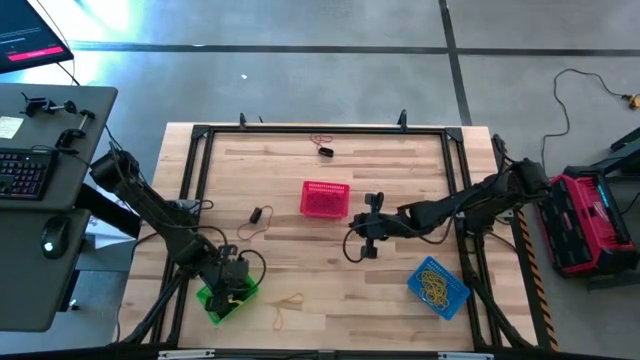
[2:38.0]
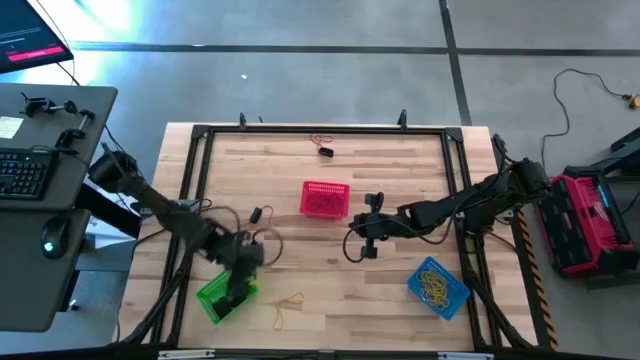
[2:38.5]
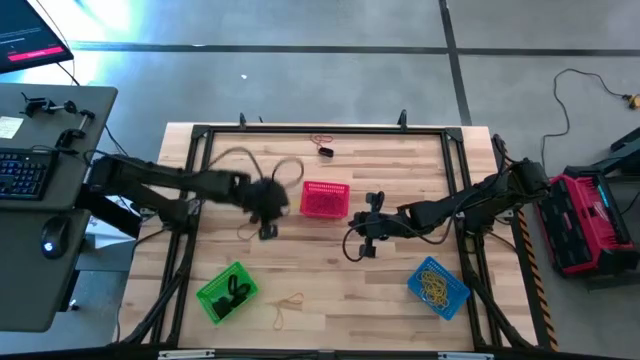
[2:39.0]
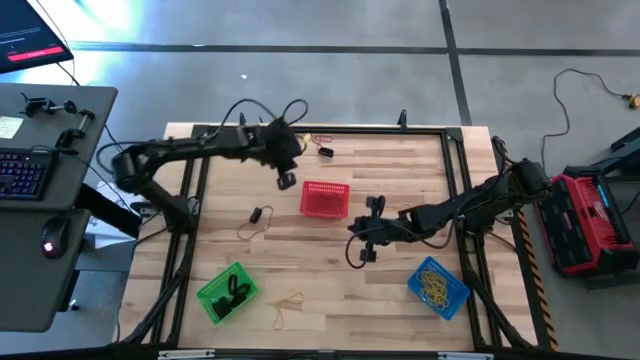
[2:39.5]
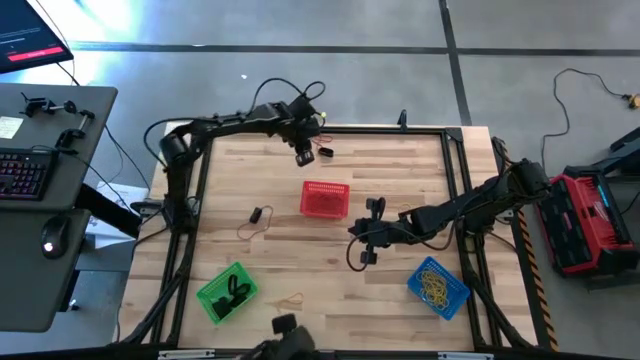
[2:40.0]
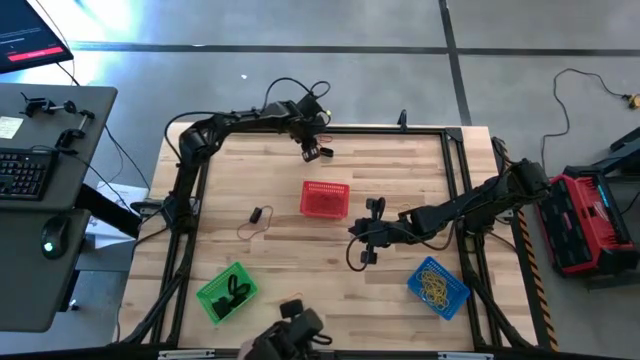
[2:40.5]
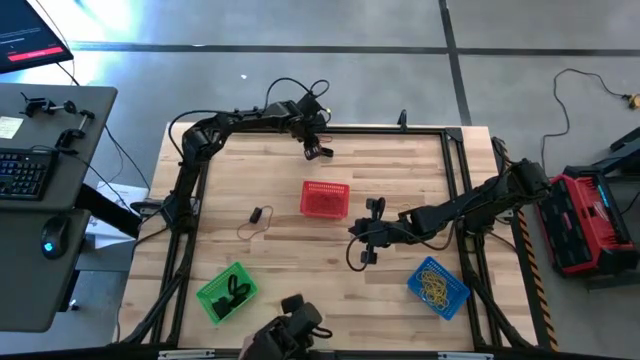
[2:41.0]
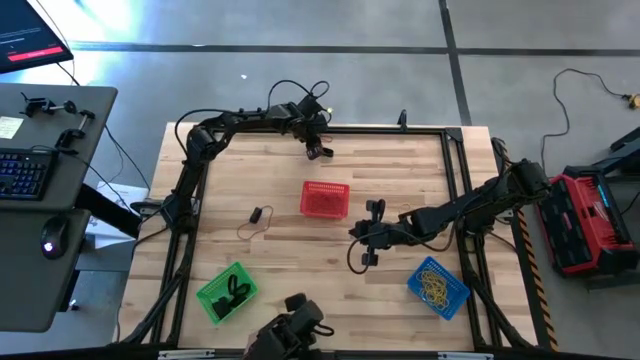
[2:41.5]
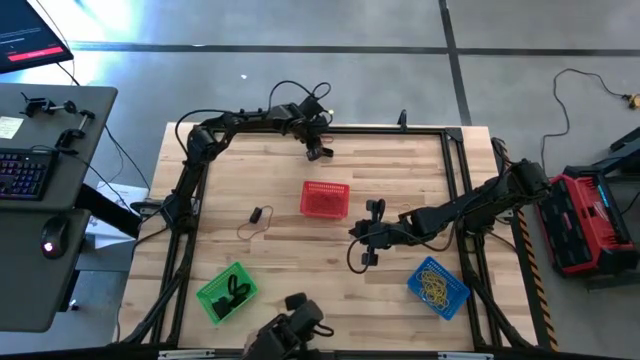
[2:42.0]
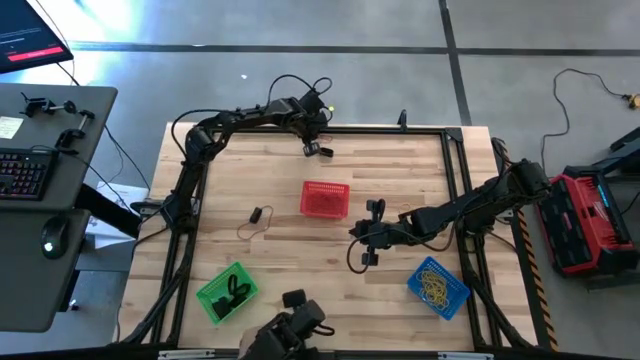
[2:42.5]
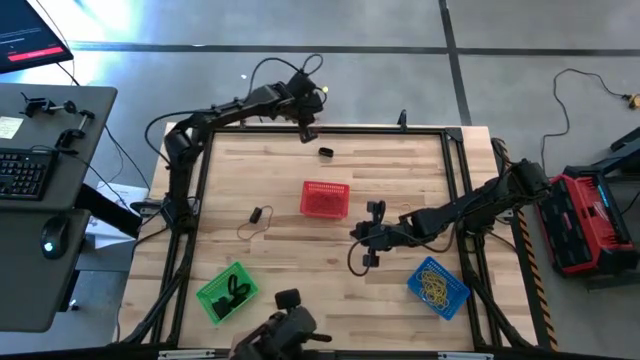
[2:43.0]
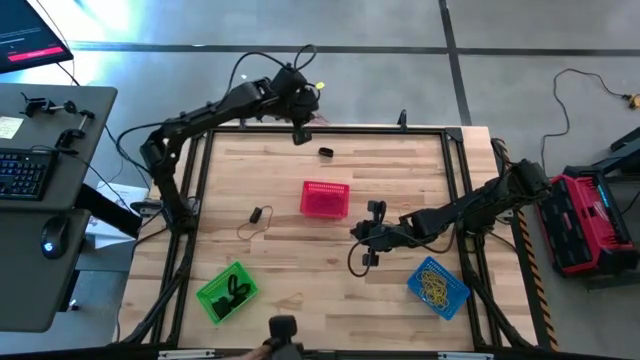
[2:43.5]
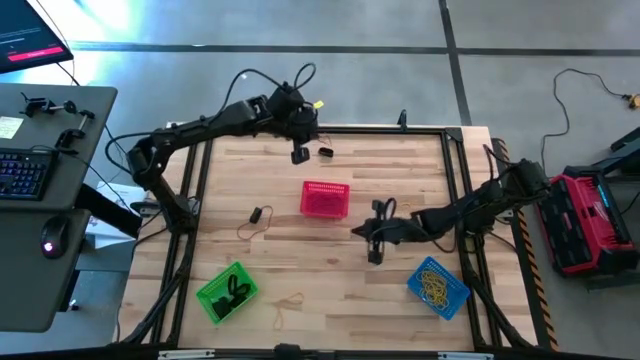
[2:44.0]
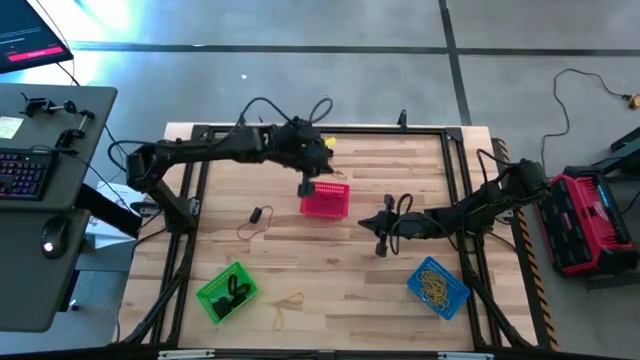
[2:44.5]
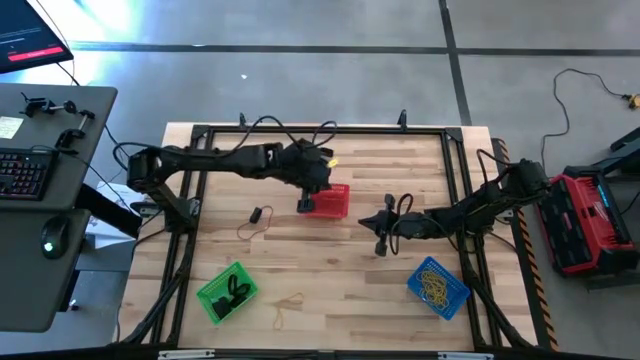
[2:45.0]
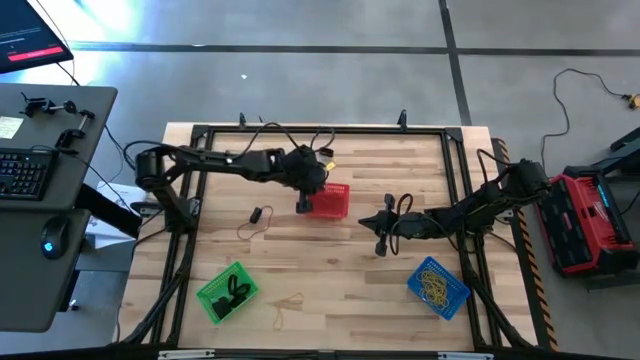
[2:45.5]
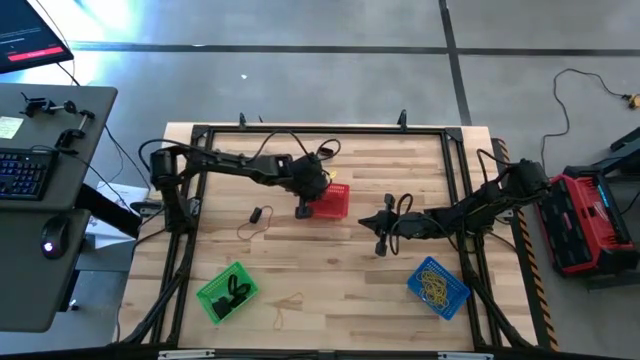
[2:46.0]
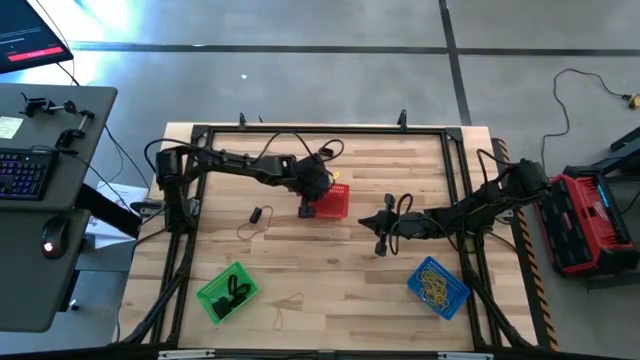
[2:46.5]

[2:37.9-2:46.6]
Task: Sort rubber bands into baskets
Put the red rubber band into the red bin

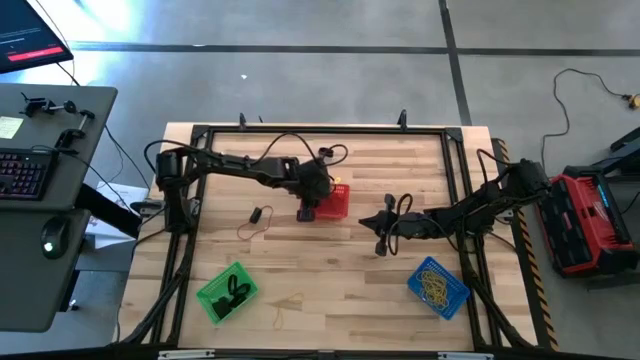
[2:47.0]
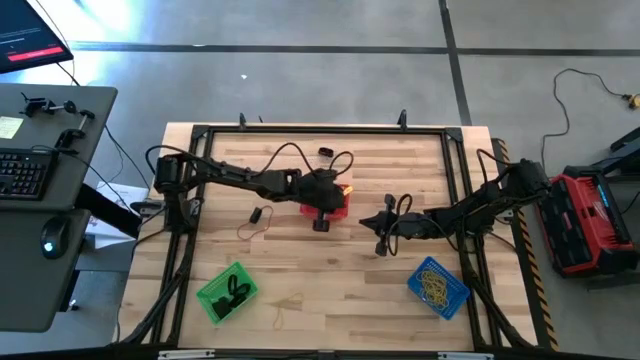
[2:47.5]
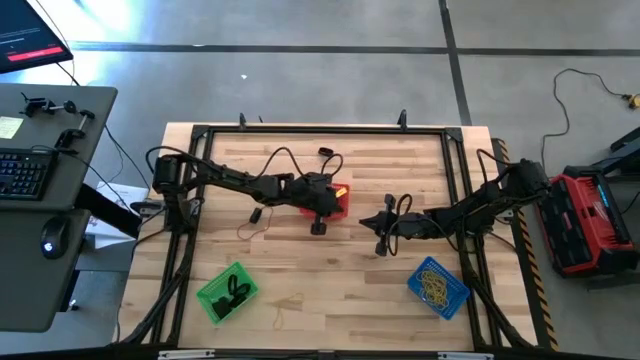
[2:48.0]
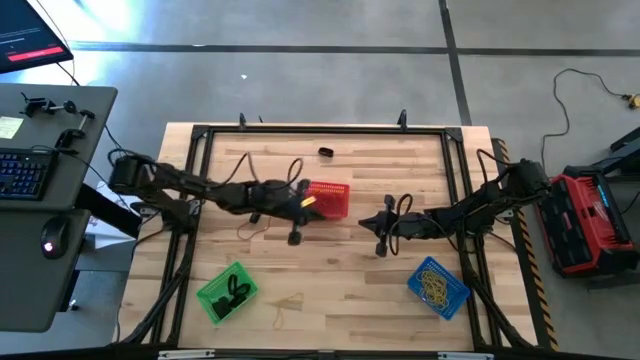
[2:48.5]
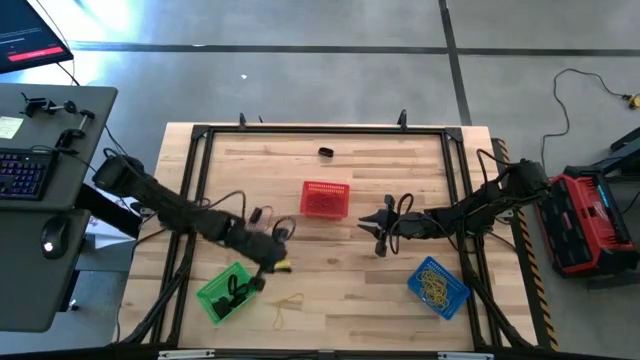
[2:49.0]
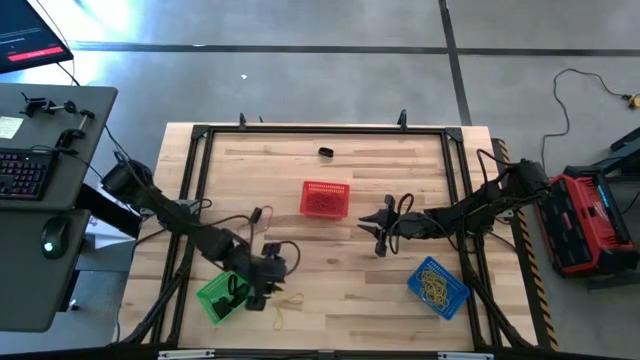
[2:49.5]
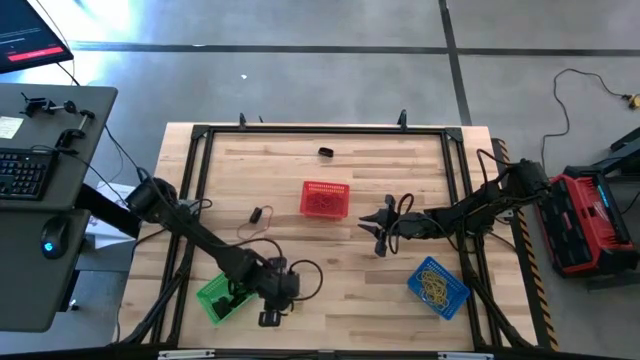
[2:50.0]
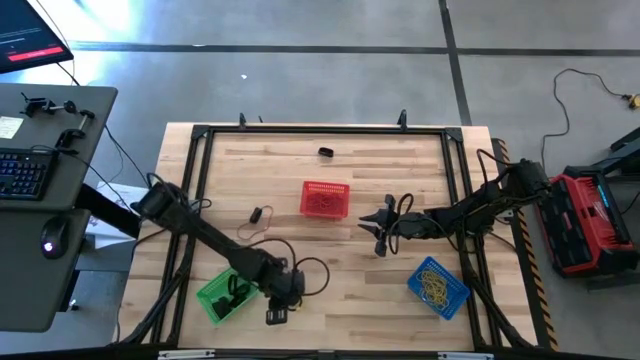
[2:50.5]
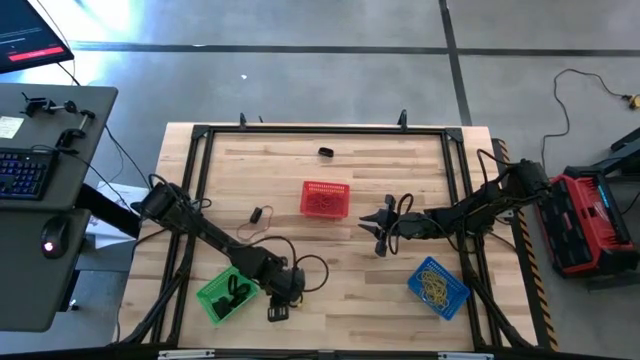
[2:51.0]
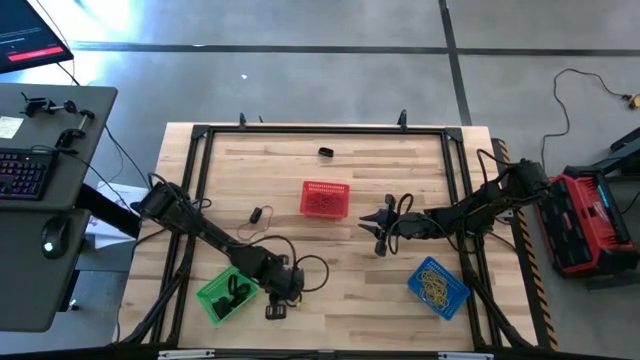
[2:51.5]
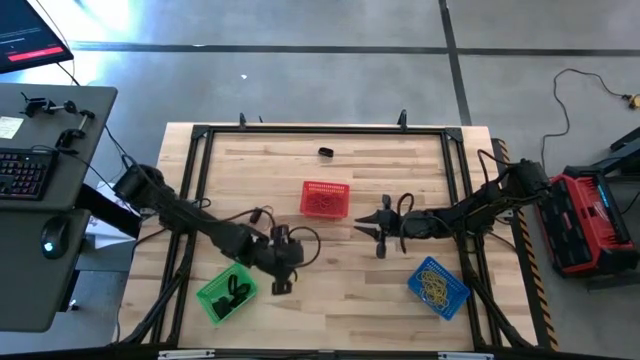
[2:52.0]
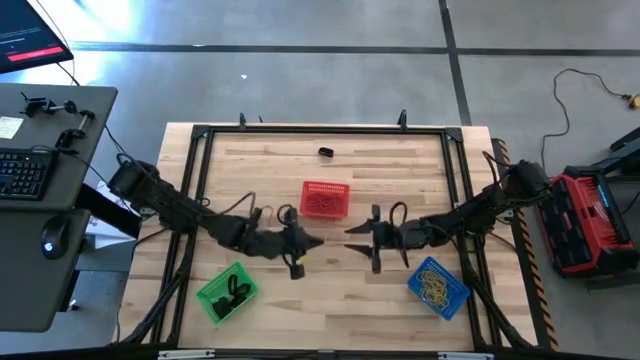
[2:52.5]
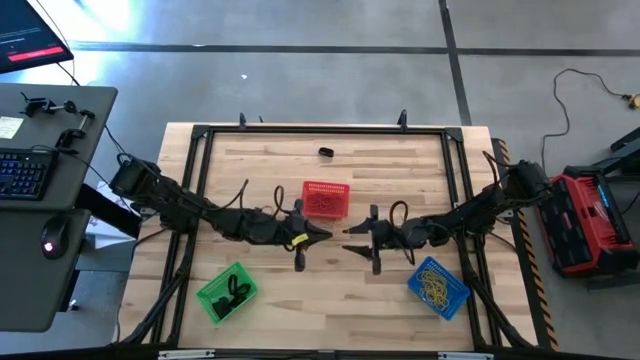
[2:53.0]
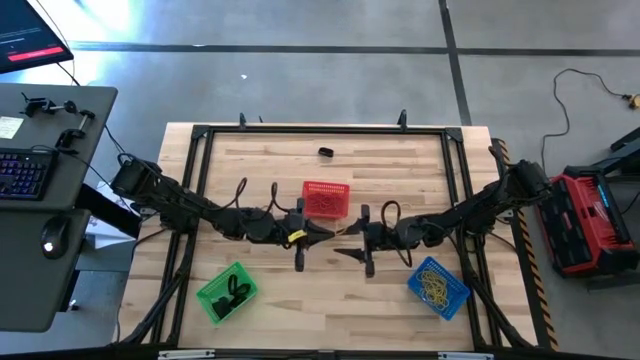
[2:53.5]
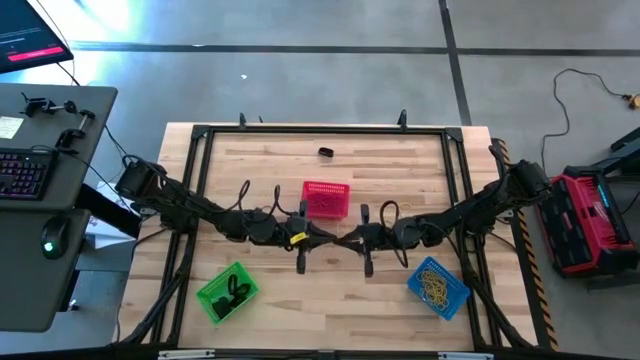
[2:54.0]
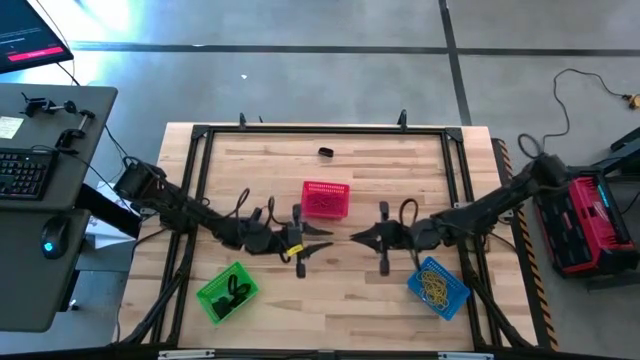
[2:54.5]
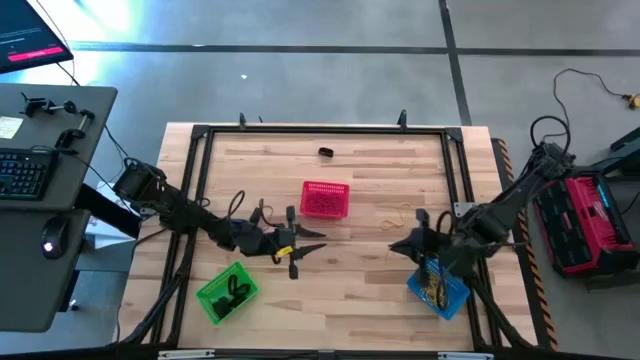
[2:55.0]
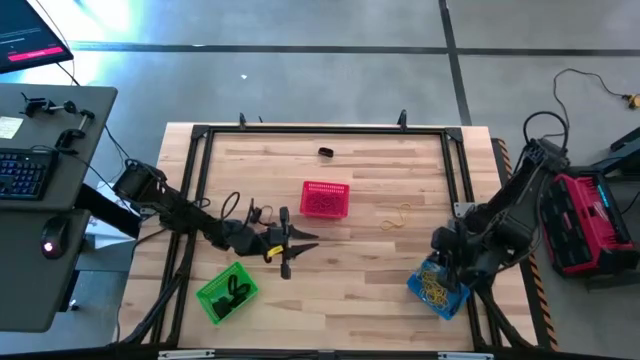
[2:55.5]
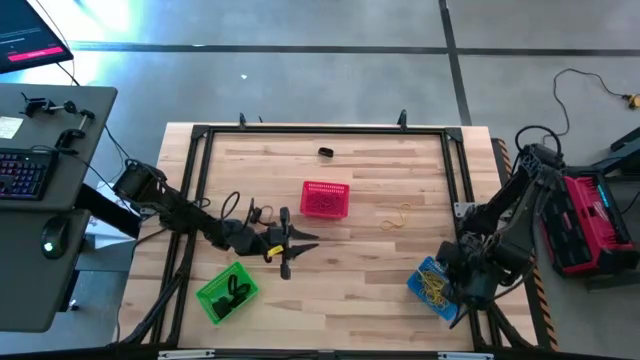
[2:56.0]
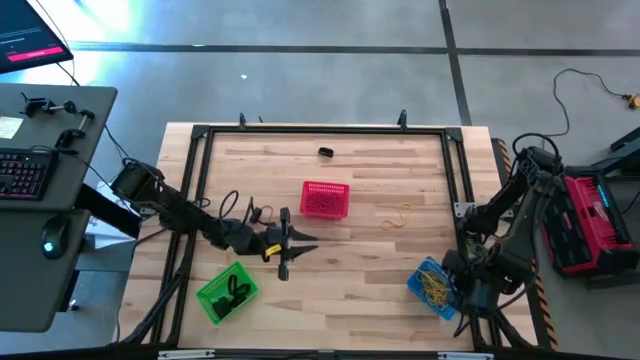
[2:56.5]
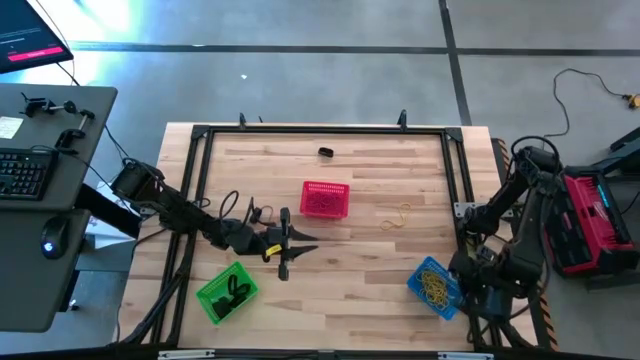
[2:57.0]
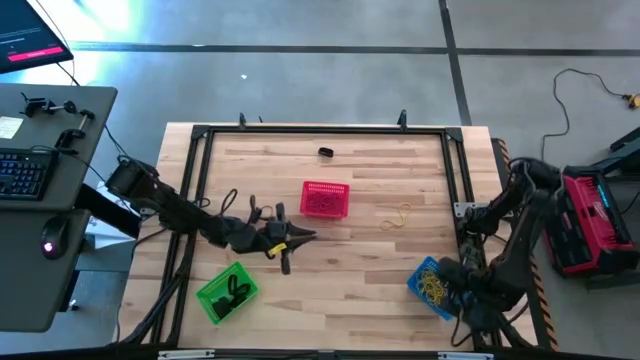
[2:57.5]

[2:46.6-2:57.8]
Put the yellow rubber band into the blue bin
